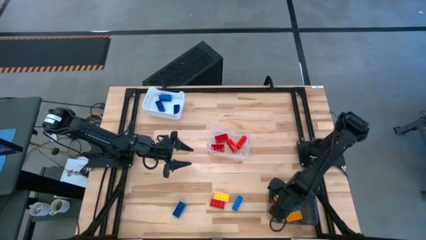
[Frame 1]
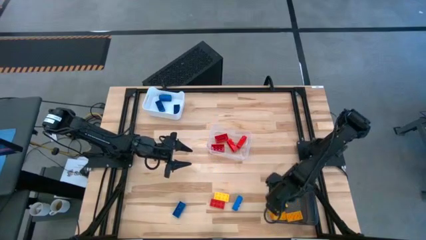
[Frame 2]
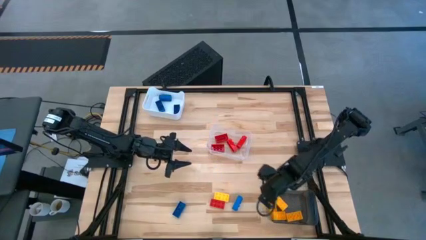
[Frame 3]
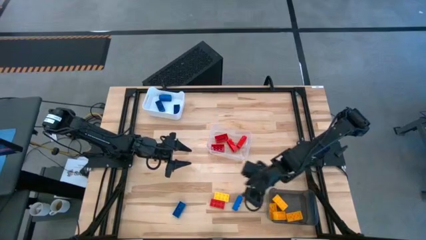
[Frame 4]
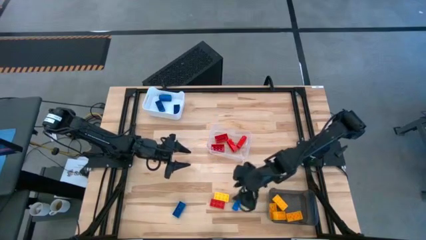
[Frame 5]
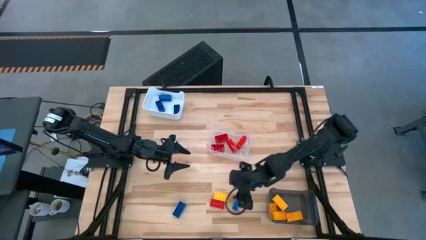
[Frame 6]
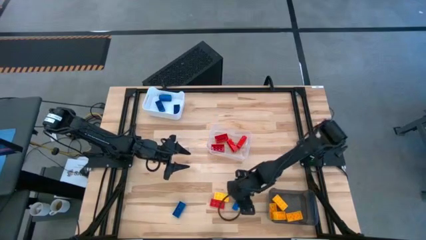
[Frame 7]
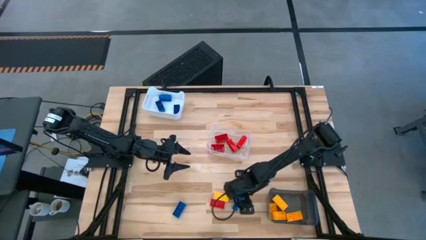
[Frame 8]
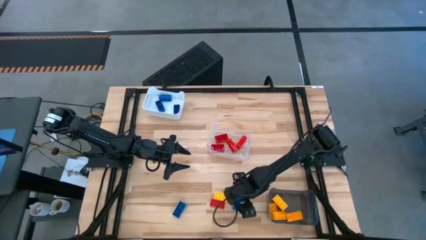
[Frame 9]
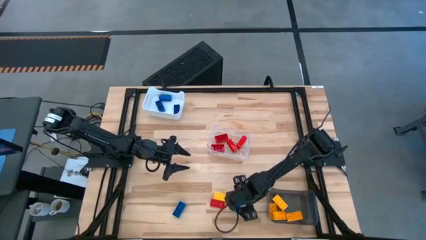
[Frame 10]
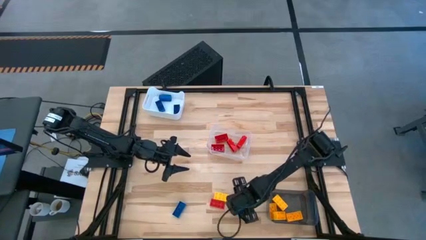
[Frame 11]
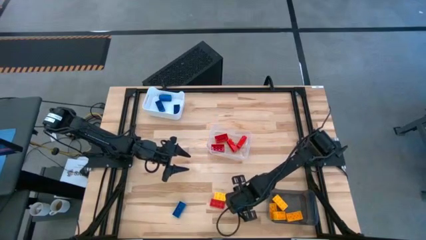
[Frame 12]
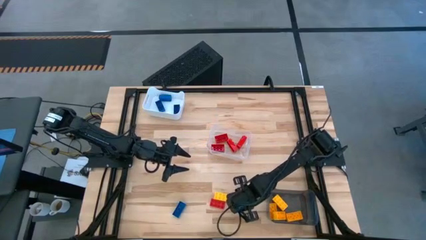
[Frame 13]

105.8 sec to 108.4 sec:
Task: Sort & place blocks by color
Put the blue game piece into the white bin

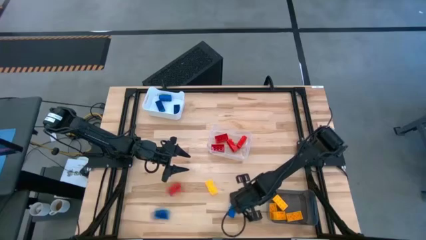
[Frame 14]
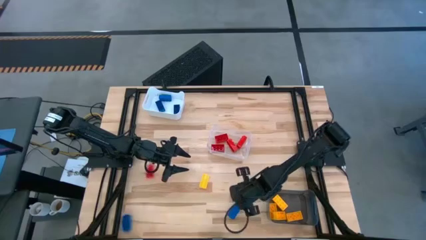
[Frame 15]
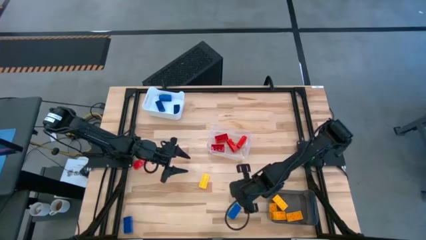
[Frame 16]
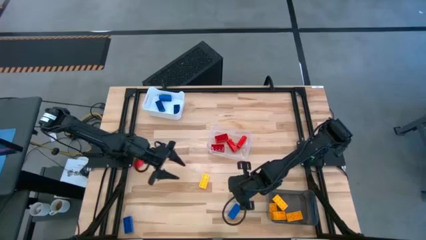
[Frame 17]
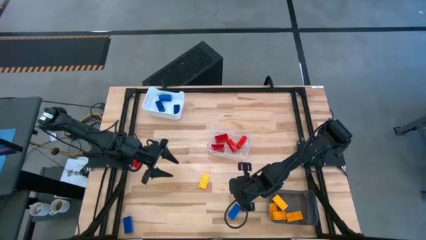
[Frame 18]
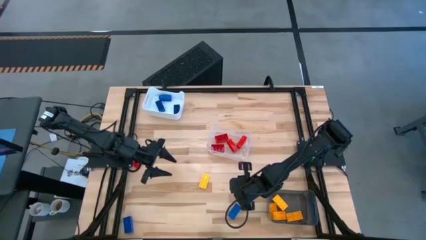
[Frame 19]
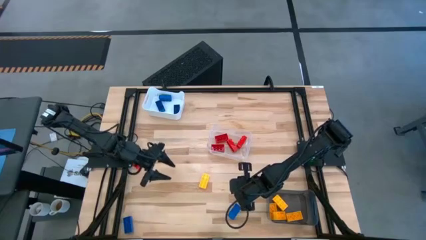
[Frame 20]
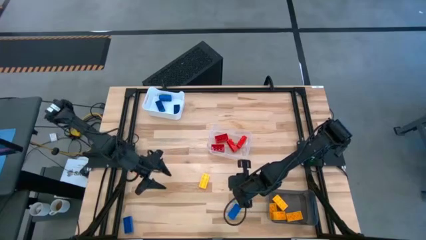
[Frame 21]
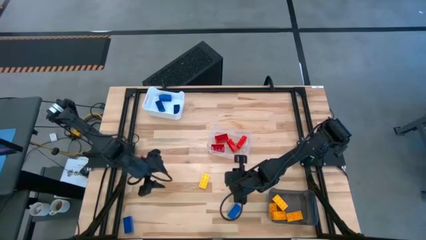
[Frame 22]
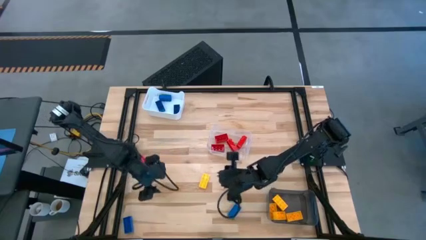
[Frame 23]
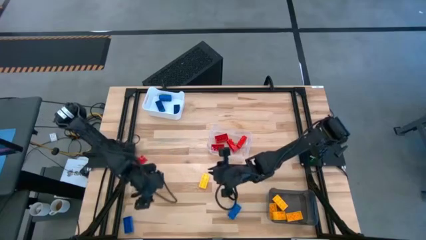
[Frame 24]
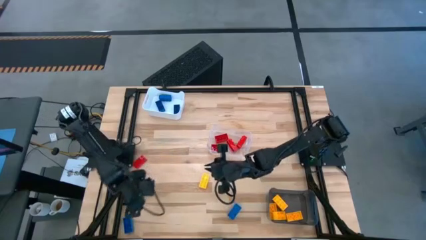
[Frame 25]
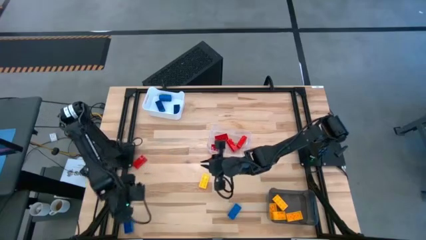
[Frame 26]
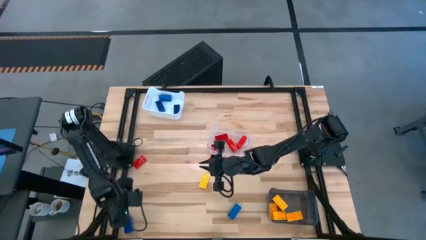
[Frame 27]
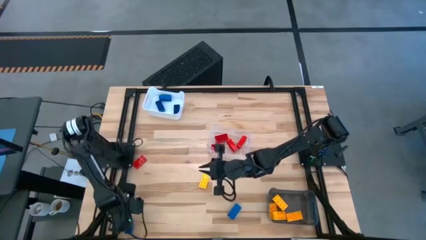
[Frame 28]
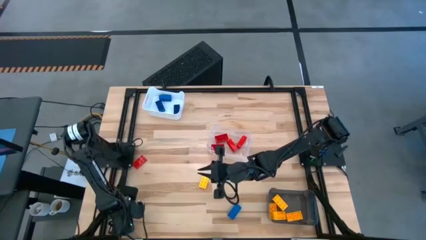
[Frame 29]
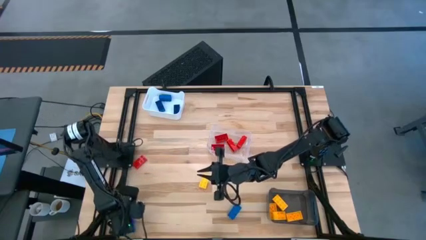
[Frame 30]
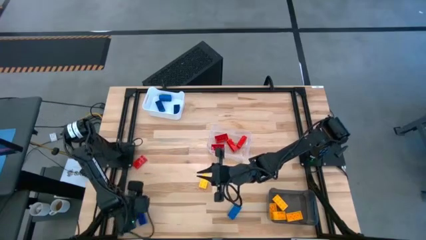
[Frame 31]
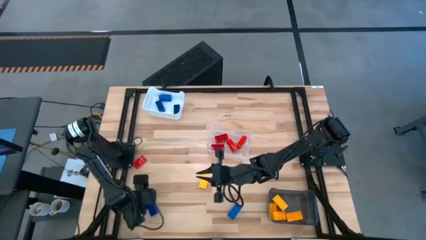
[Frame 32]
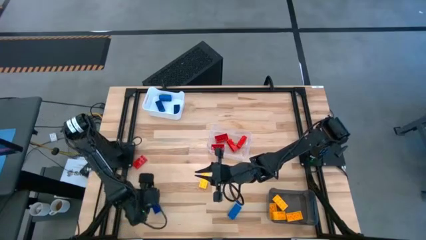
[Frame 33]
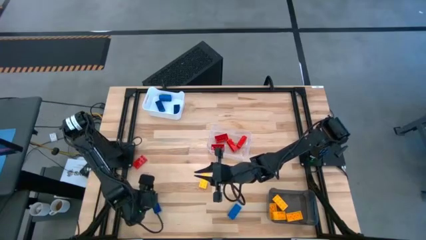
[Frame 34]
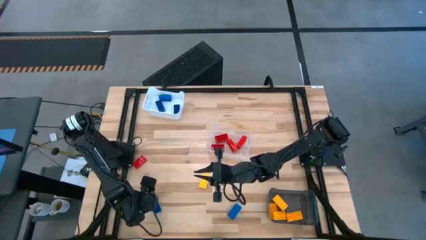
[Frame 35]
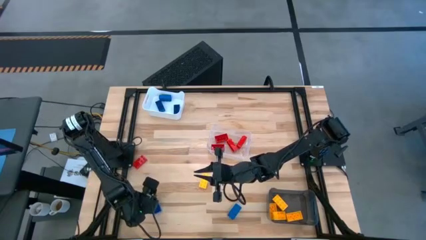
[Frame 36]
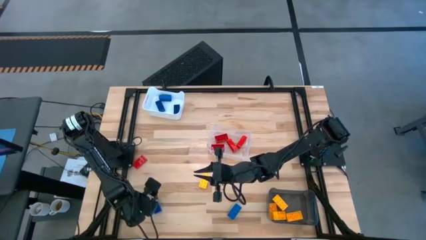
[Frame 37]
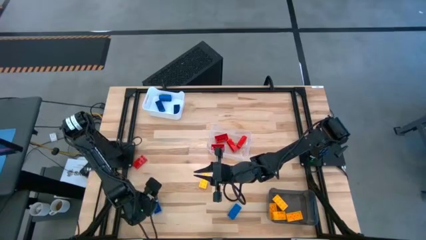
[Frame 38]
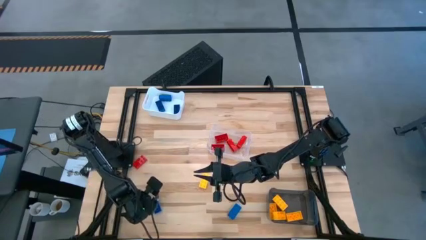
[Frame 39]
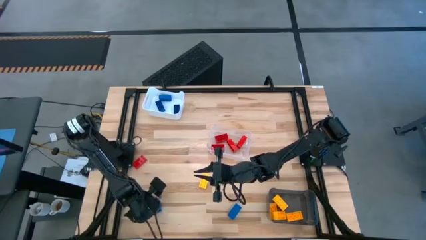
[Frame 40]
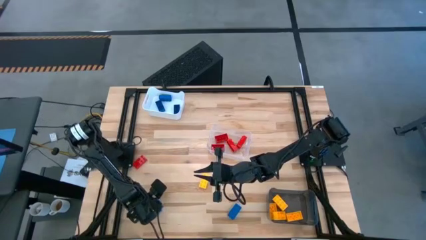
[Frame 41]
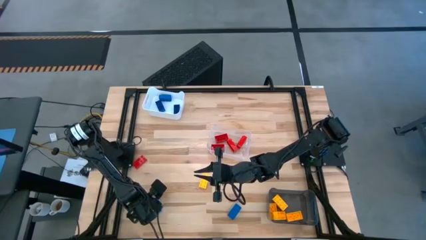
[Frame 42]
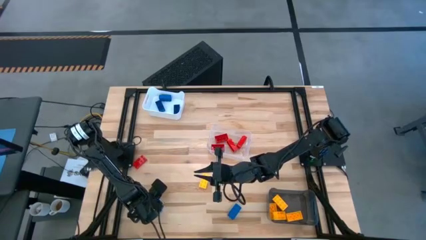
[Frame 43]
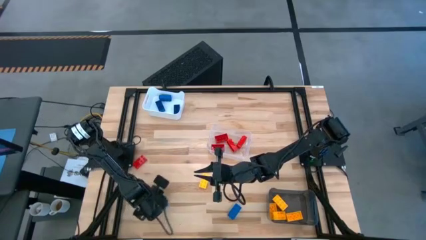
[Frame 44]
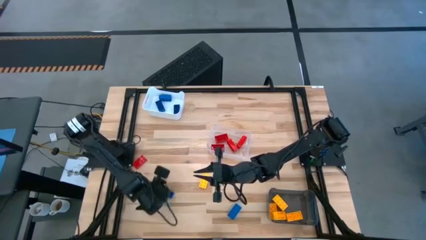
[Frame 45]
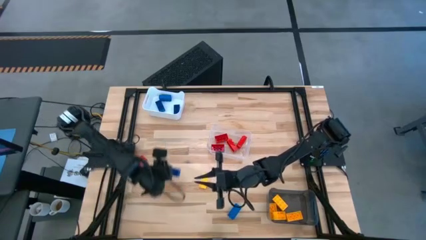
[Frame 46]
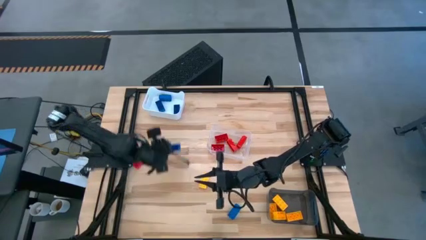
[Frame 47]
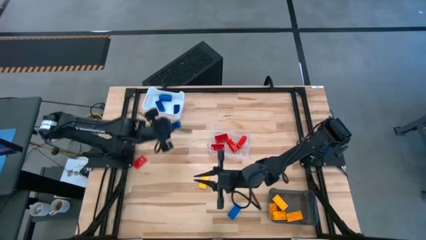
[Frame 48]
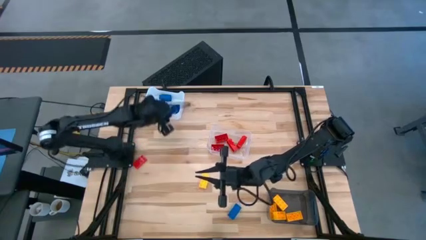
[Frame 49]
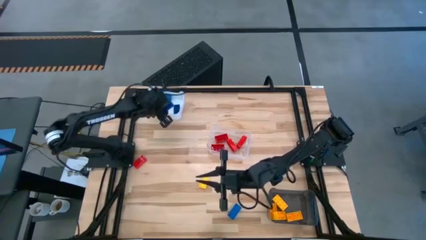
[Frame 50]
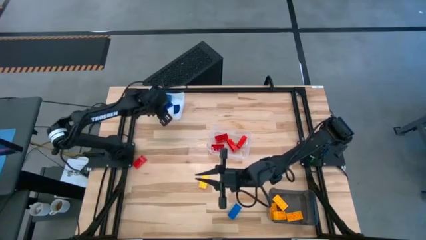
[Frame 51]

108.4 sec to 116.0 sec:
Put the blue game piece into the white bin

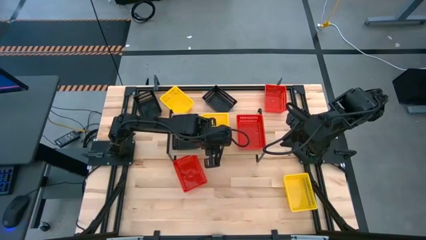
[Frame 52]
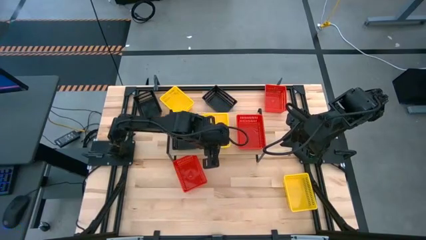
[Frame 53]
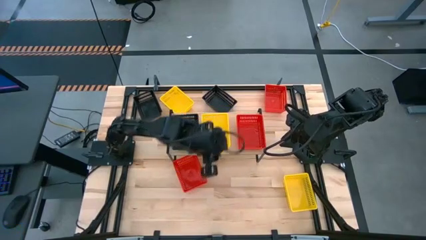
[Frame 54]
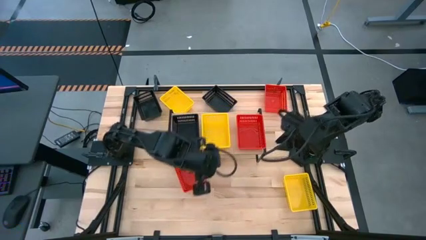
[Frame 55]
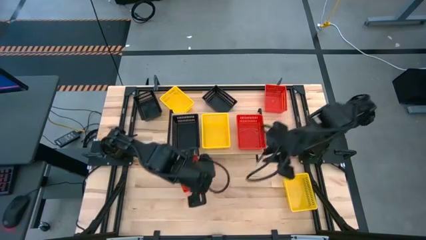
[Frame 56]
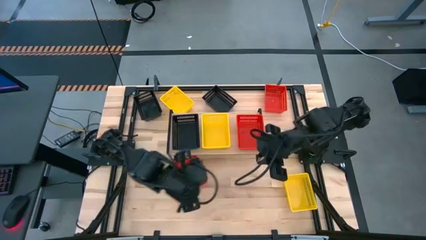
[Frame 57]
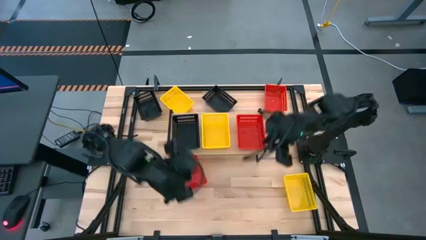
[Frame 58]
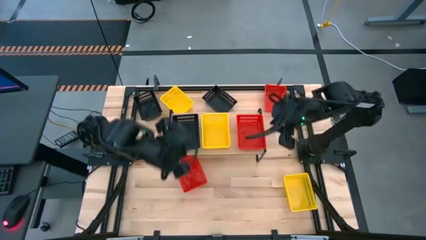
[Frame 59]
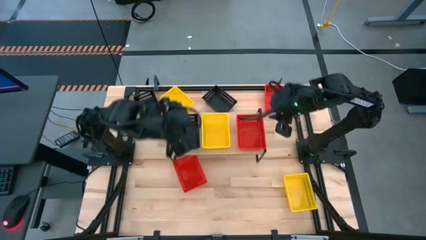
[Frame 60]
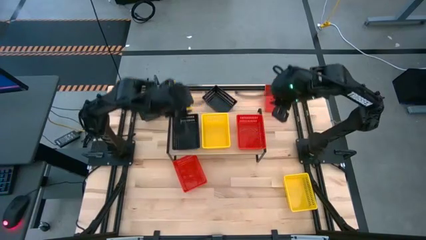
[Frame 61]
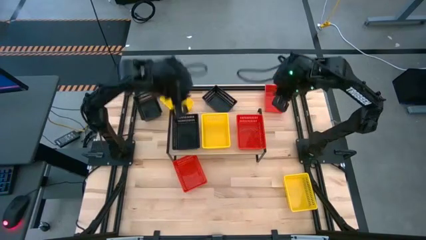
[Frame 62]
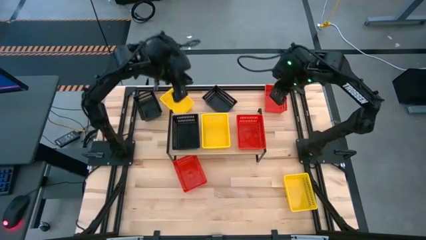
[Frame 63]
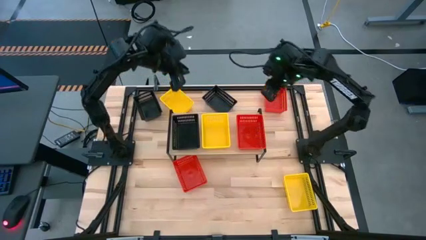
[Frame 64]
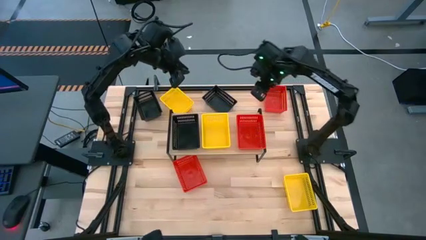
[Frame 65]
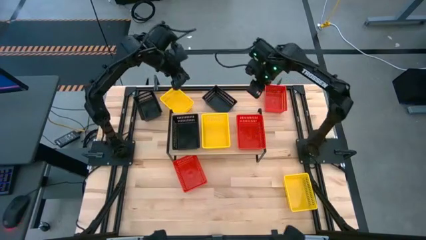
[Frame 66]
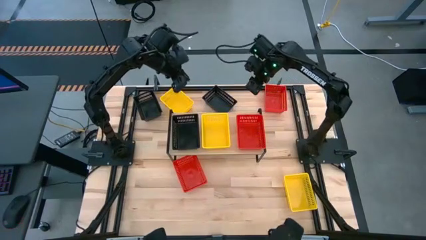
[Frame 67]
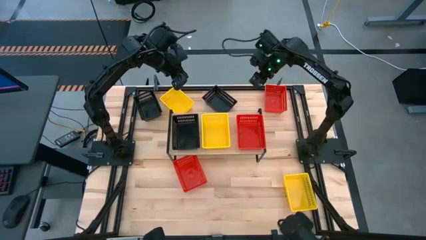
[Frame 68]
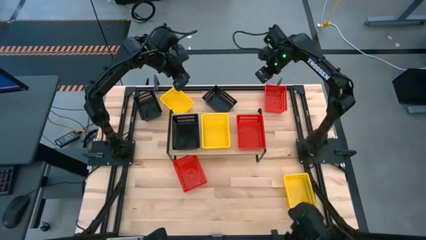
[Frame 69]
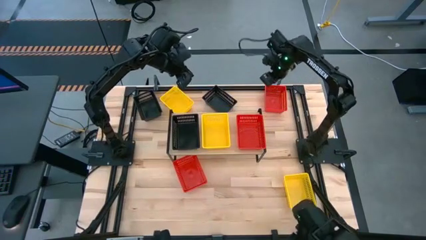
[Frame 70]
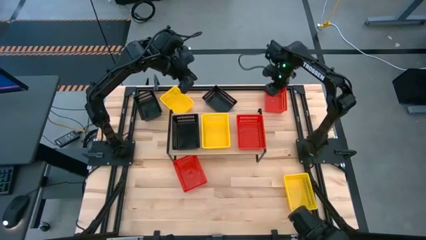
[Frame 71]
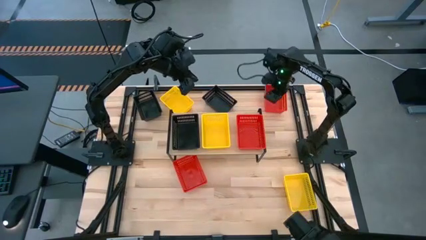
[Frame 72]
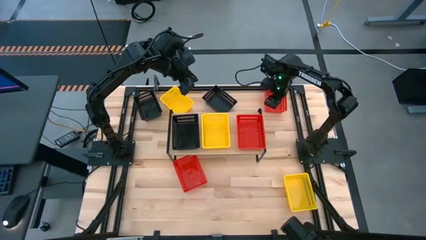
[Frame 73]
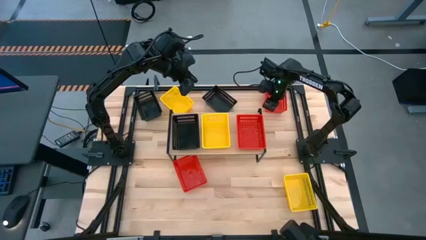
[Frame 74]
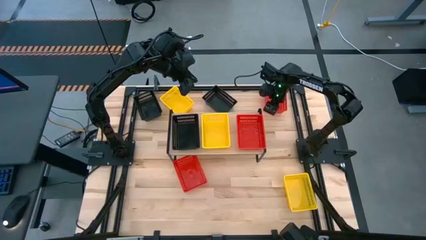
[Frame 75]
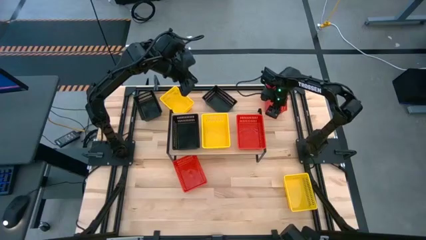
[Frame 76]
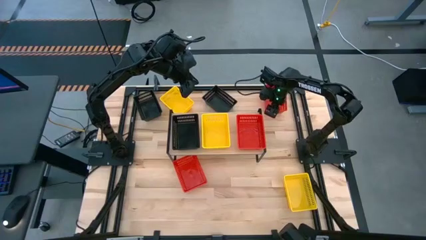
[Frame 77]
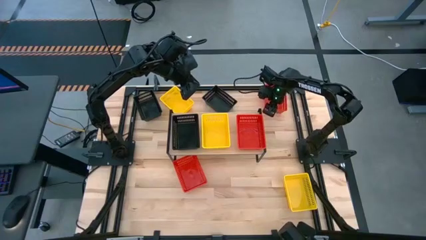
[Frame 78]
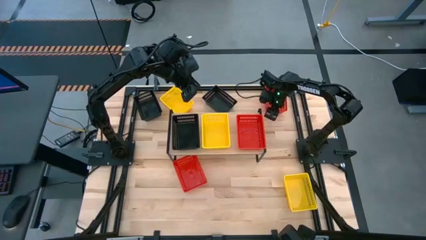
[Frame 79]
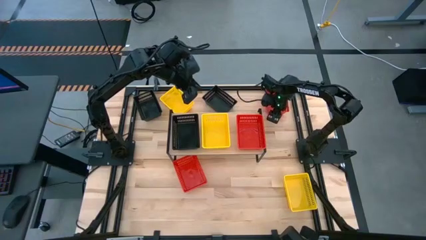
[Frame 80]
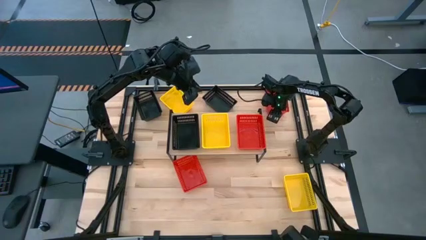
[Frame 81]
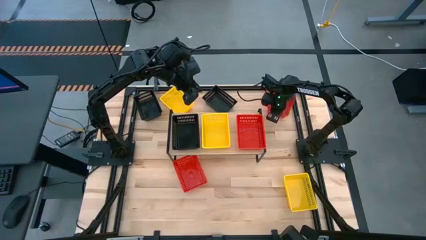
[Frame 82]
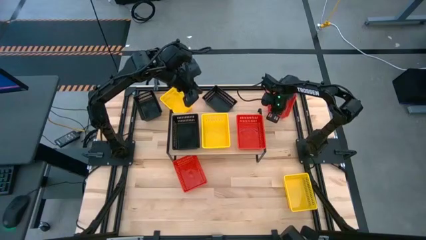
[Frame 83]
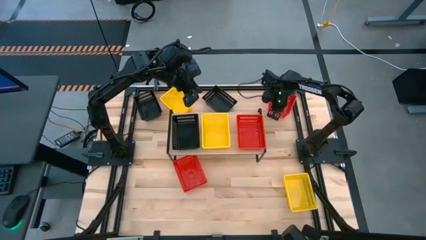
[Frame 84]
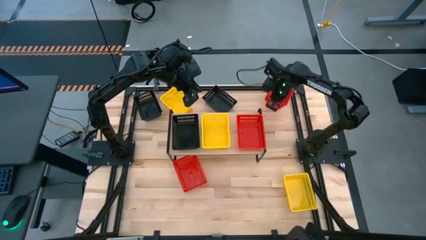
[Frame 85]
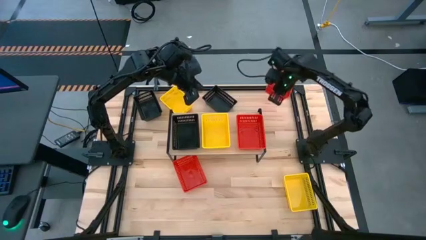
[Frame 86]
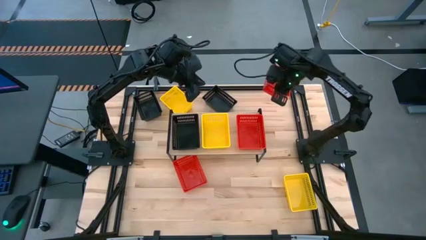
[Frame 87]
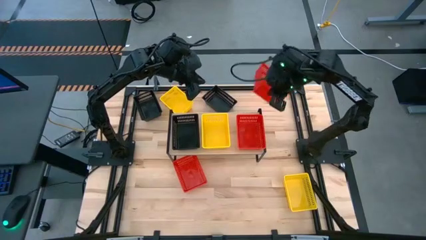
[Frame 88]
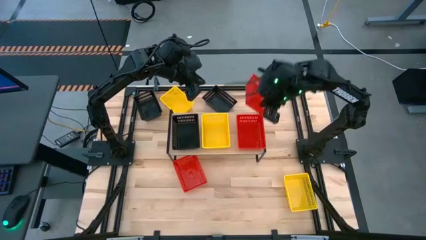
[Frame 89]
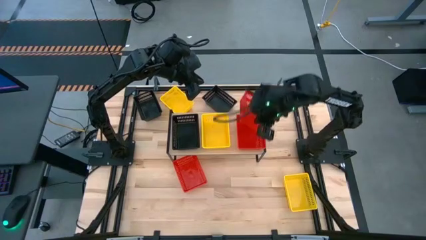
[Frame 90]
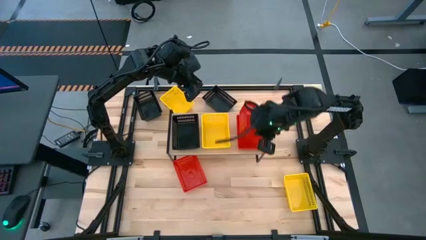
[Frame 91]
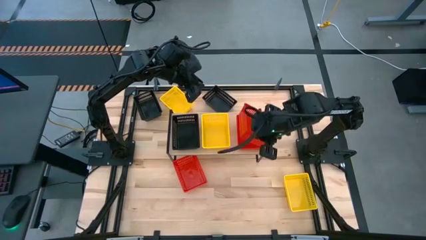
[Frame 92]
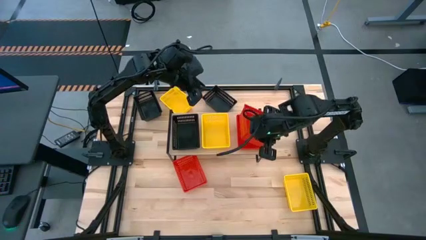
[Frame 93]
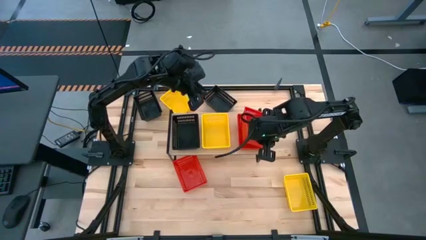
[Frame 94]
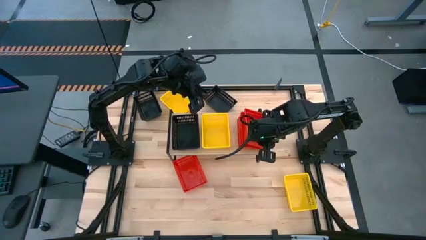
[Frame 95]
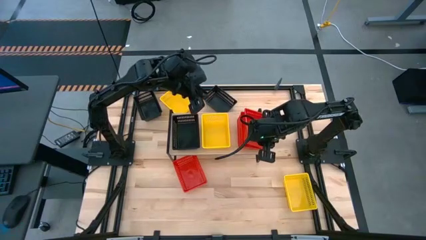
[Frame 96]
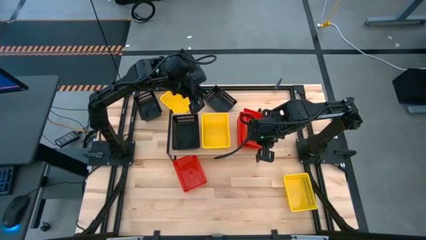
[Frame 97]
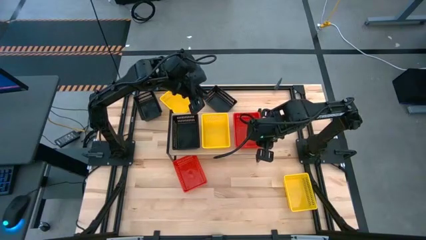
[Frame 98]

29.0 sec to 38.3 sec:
Task: Stack baskets on shelf by color
Stack the top red basket on the red basket on the shelf
